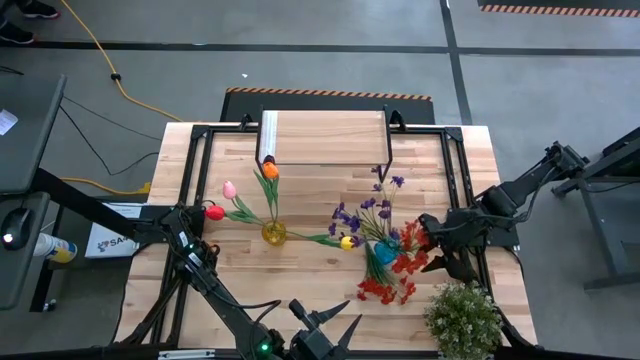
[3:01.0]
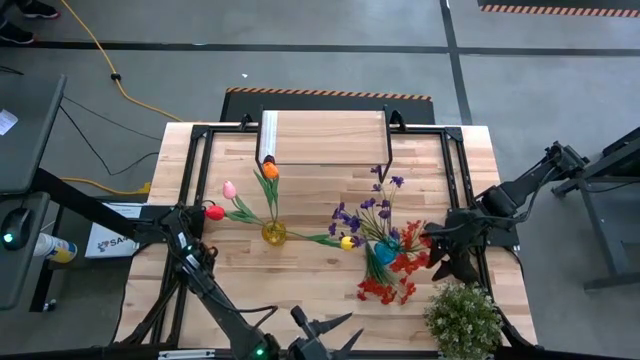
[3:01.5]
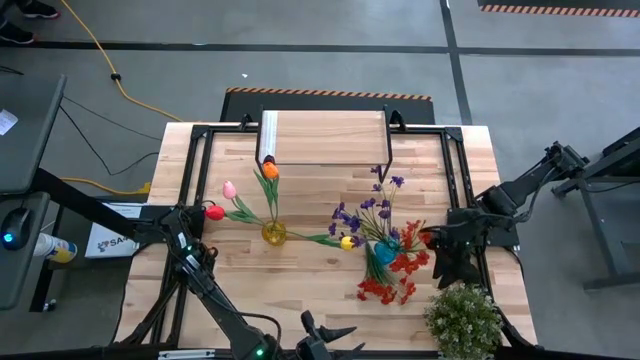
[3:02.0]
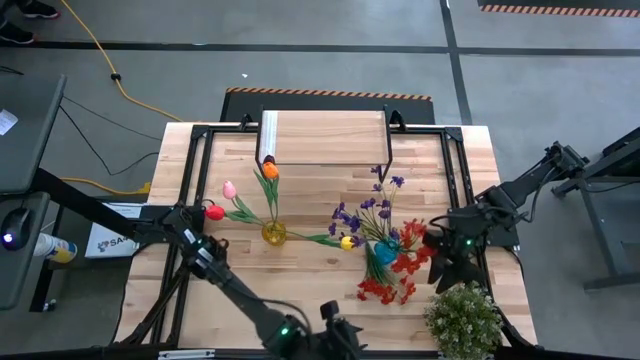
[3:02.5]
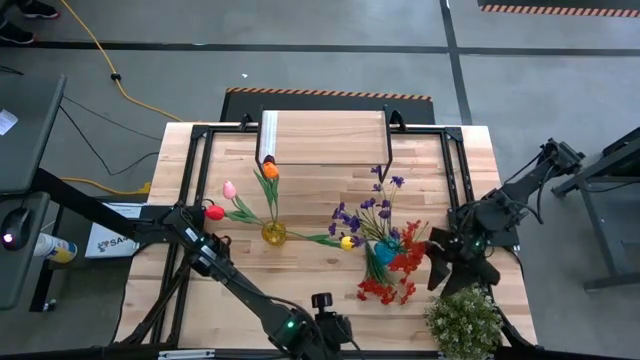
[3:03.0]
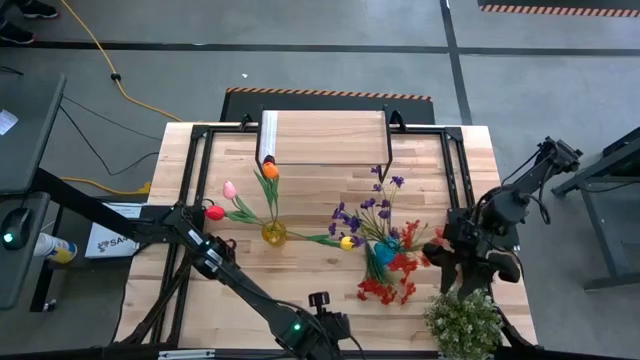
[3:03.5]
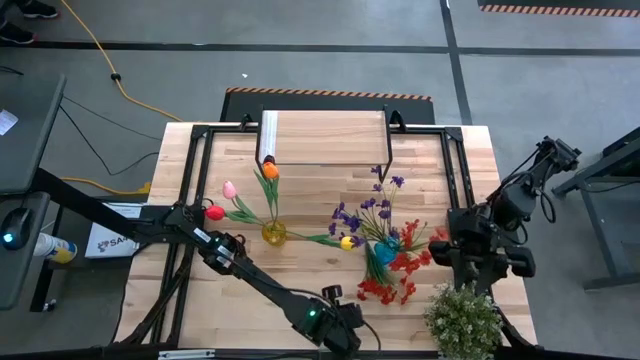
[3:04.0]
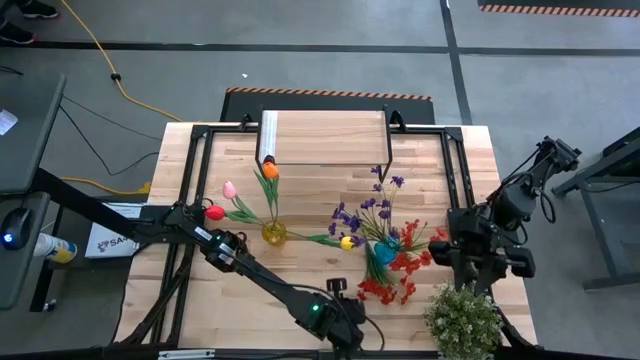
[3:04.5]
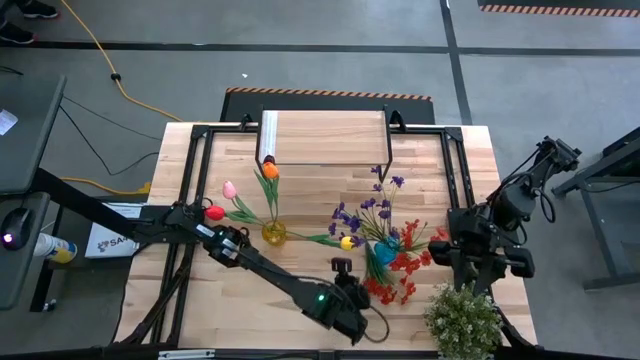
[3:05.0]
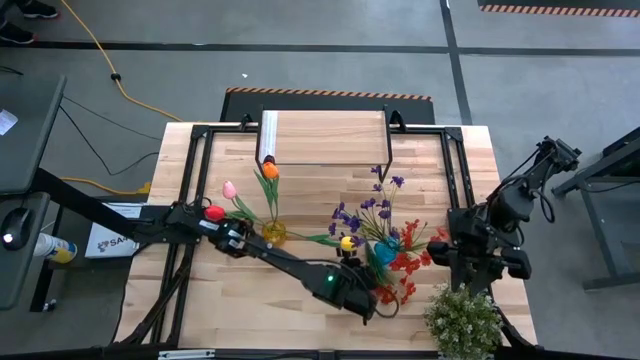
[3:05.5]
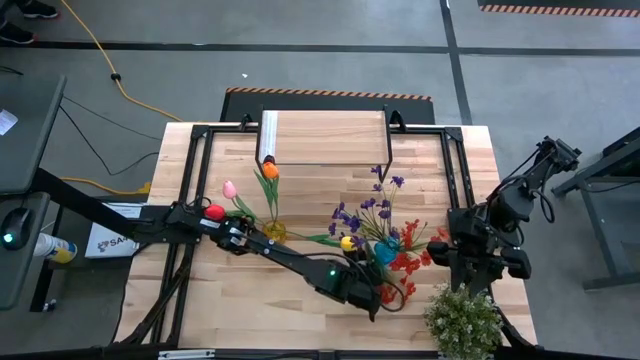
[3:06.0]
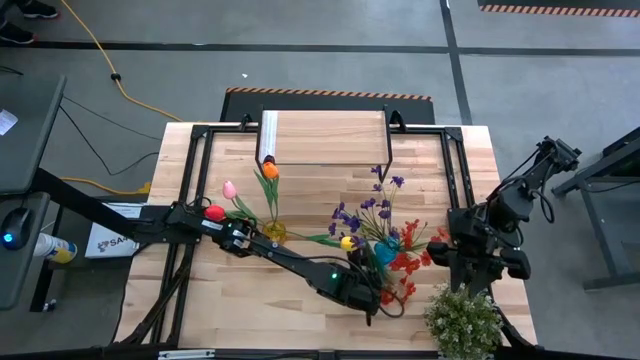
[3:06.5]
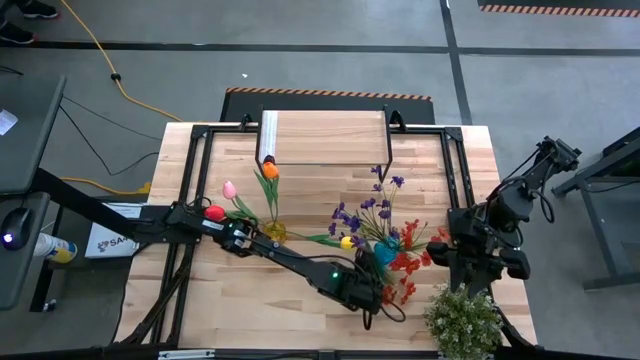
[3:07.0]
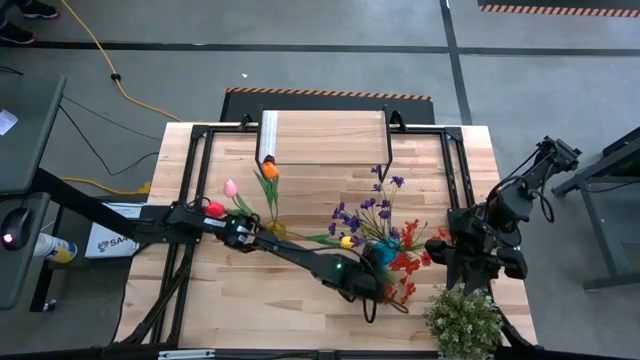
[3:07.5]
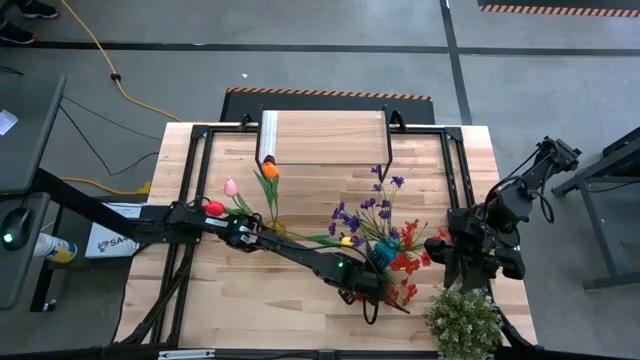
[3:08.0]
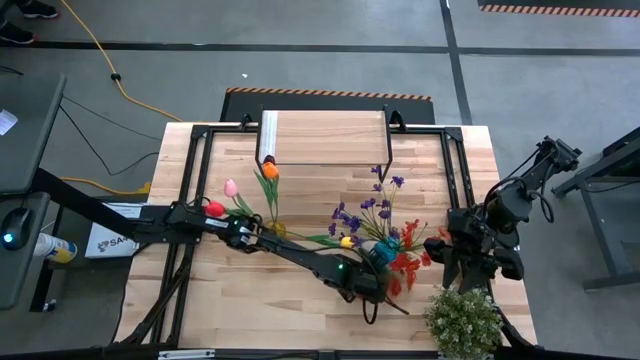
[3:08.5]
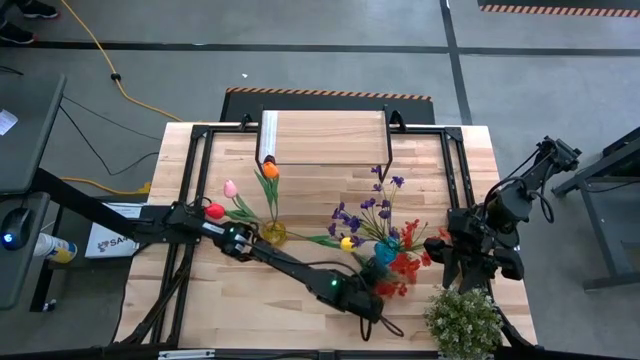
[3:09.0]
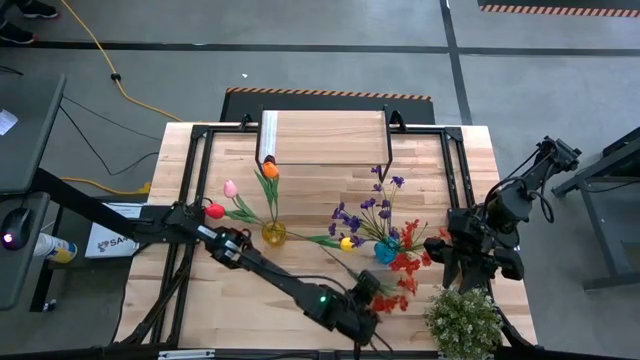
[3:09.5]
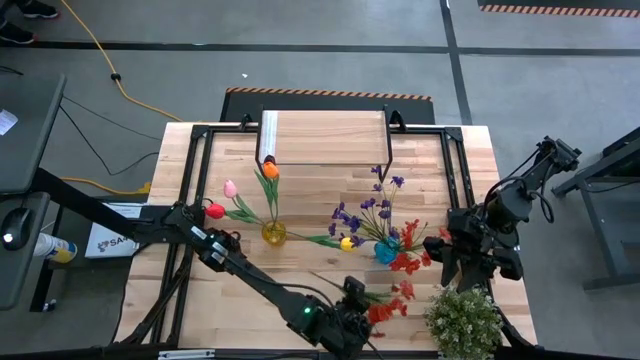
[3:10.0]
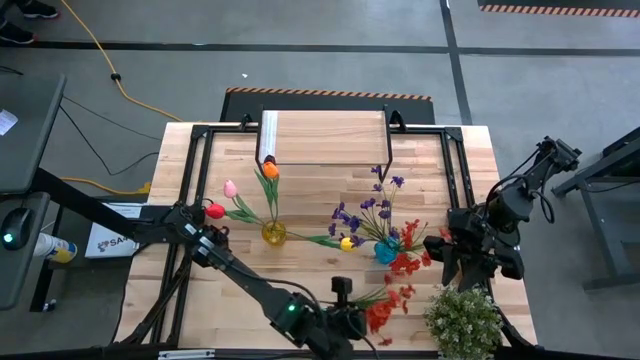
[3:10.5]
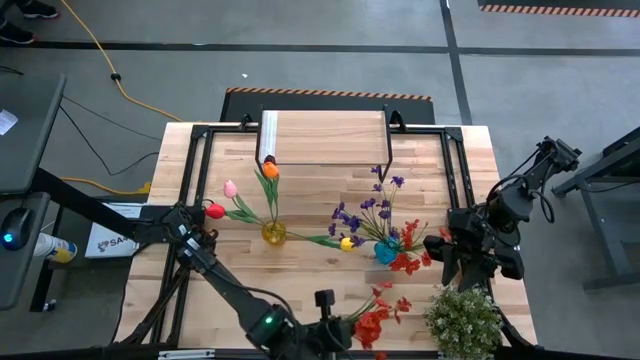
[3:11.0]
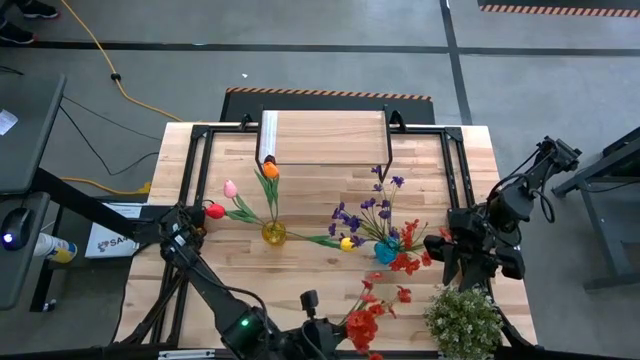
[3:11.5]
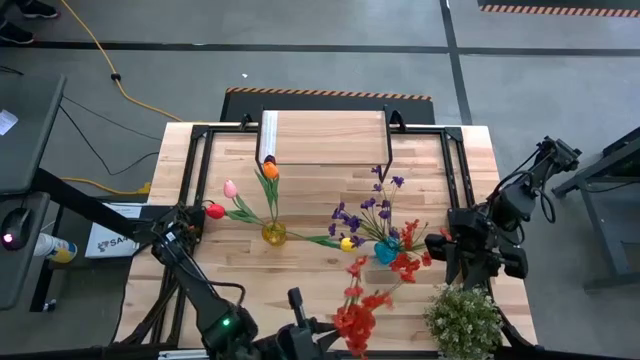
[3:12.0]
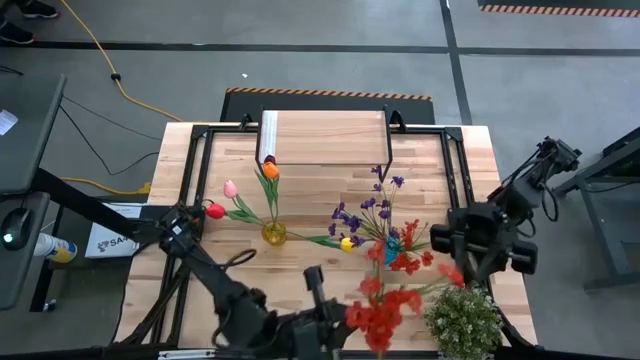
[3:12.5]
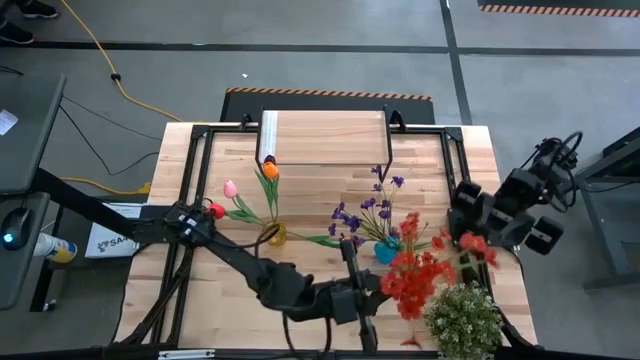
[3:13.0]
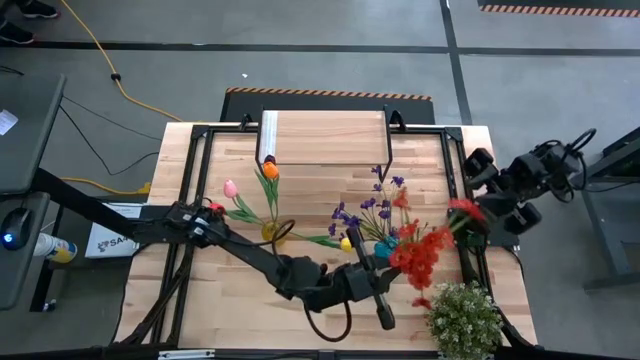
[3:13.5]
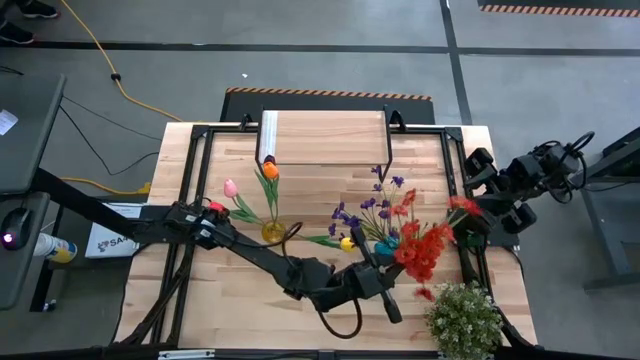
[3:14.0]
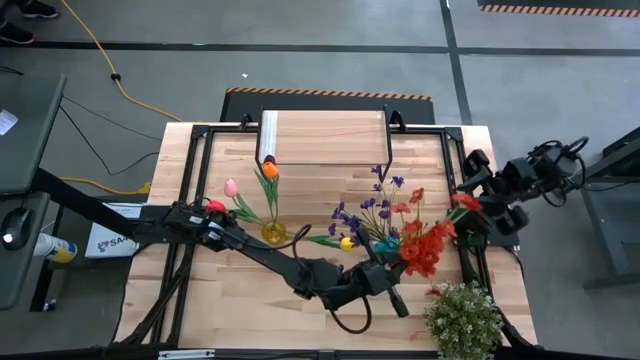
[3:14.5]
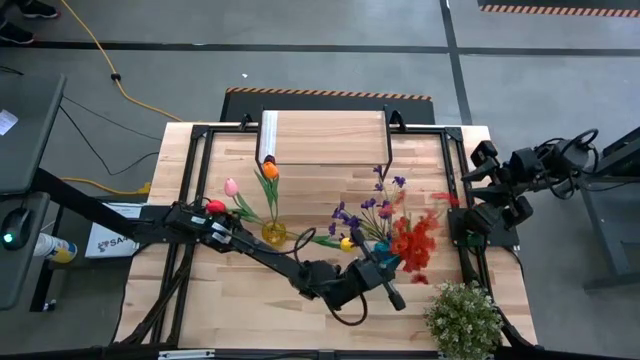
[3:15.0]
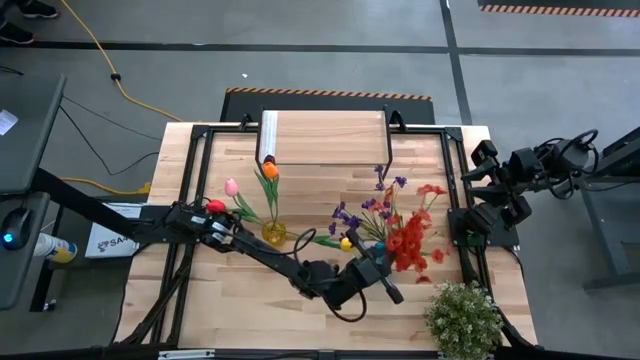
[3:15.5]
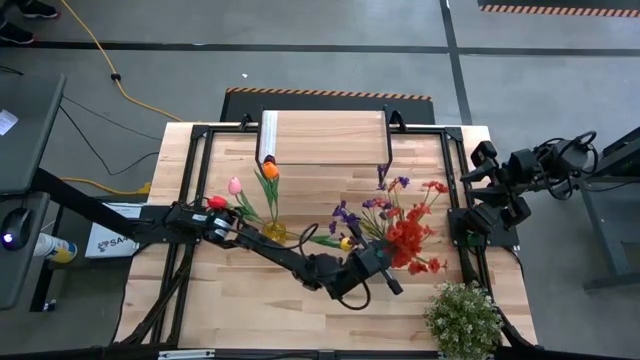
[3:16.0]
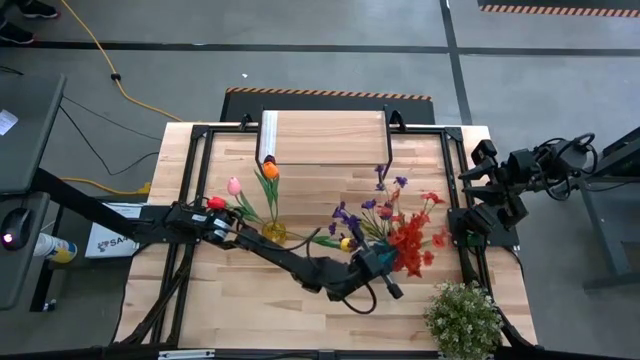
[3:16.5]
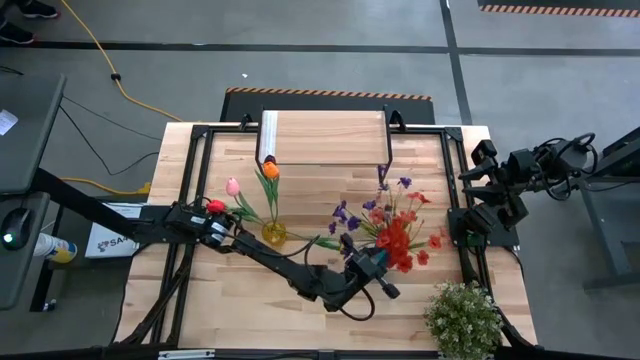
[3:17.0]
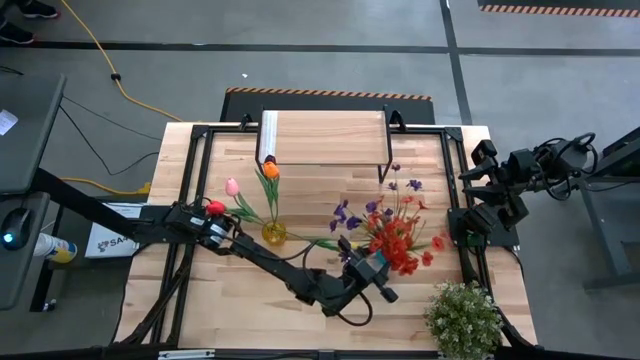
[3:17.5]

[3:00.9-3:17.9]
Task: Pick and place flowers into a vace then onto a shelf
Put the red flowers into the blue vase

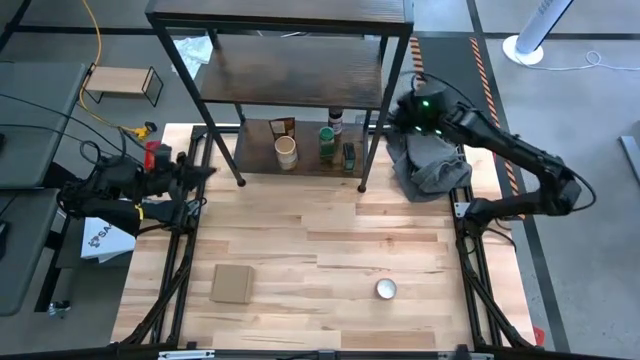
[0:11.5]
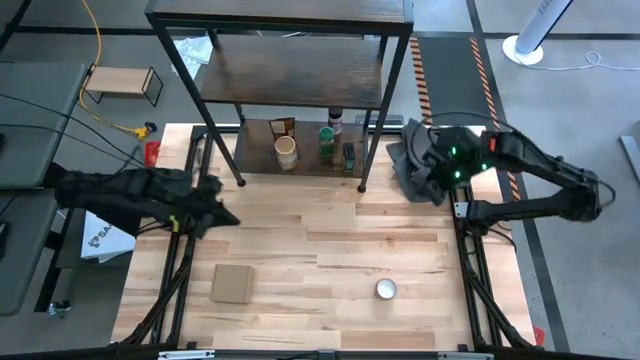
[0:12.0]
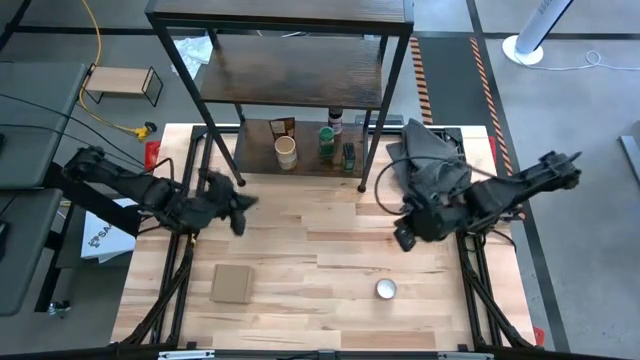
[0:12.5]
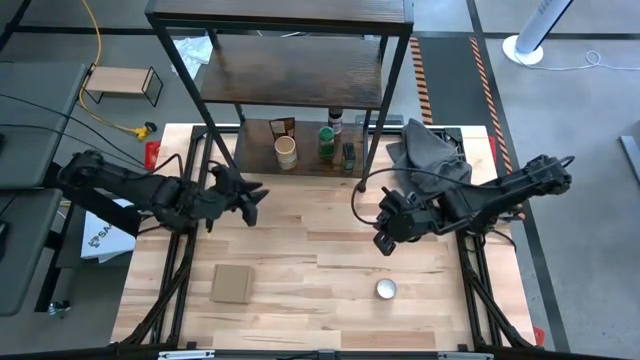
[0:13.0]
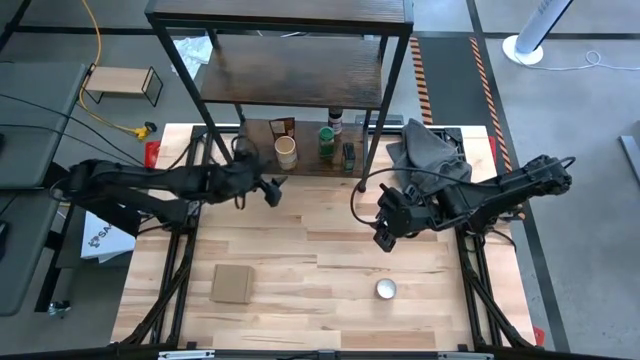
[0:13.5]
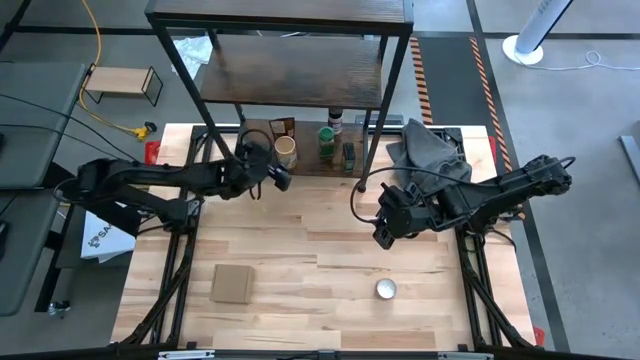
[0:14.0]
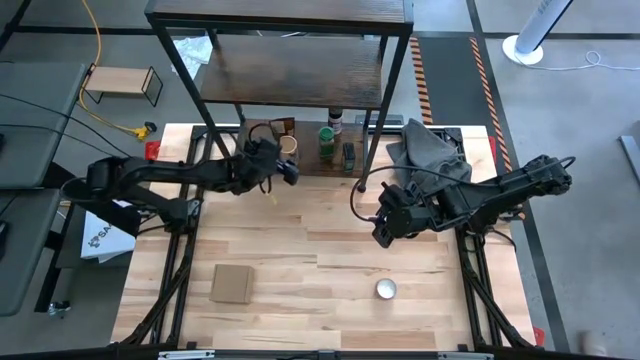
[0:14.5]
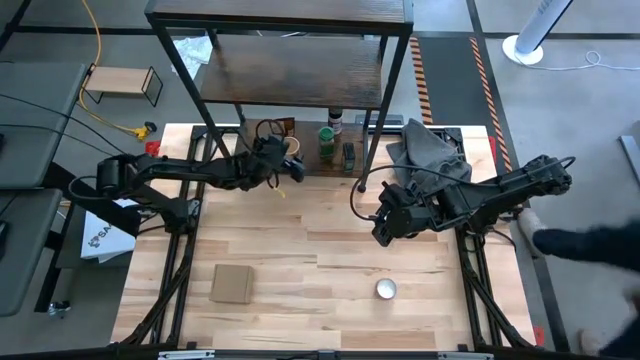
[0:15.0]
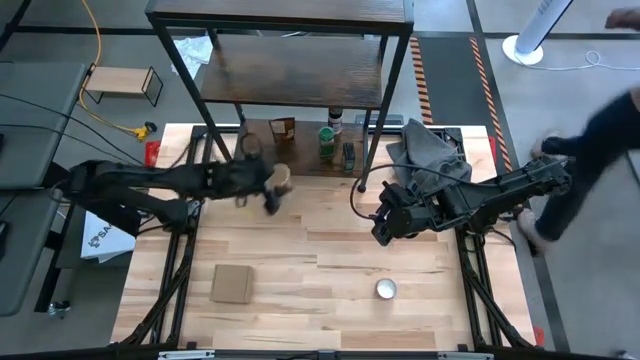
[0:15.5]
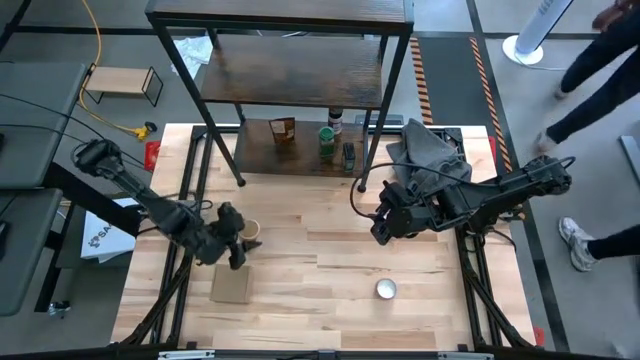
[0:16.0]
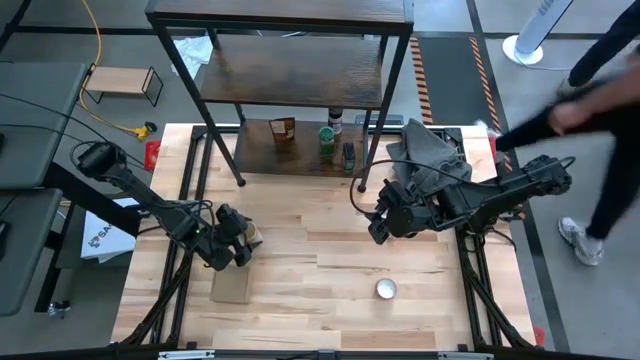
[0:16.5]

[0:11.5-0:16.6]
Task: Shelf spices
Remove the gold seasoning bottle from the shelf
